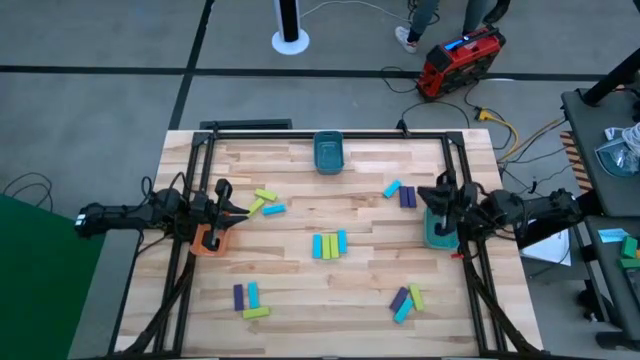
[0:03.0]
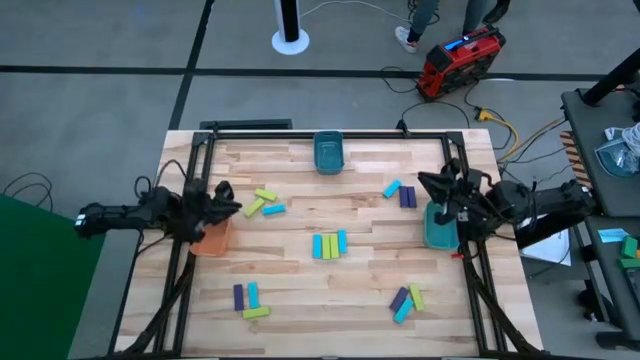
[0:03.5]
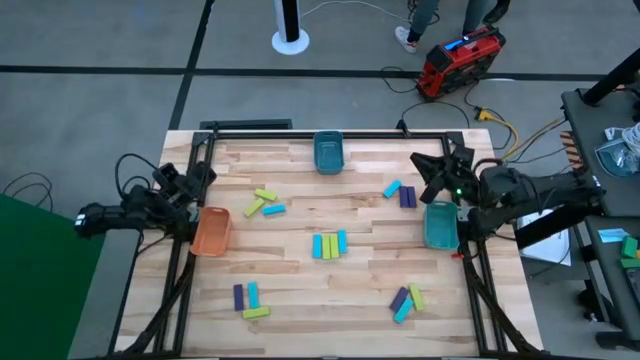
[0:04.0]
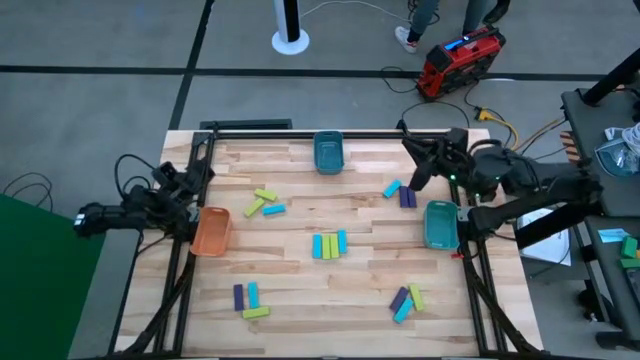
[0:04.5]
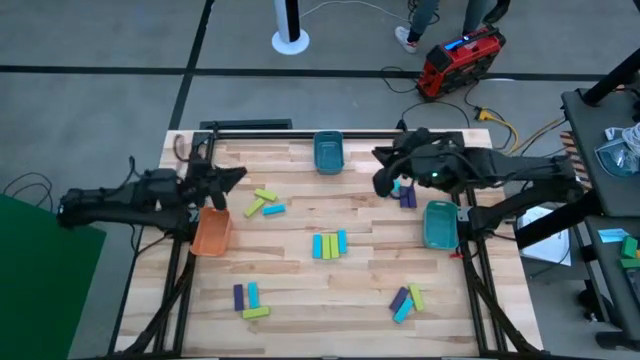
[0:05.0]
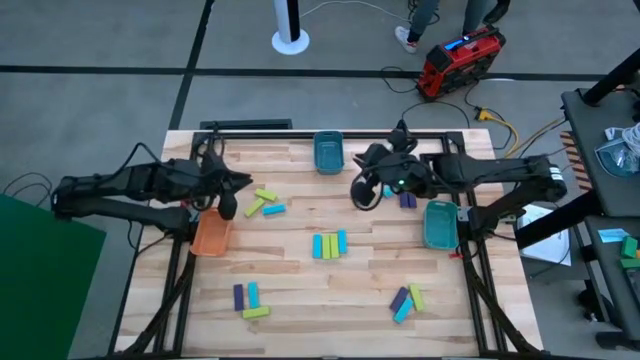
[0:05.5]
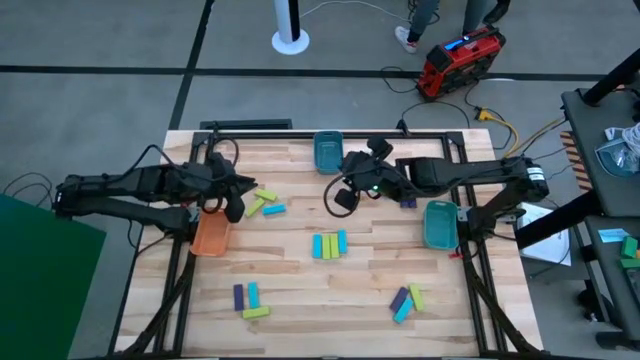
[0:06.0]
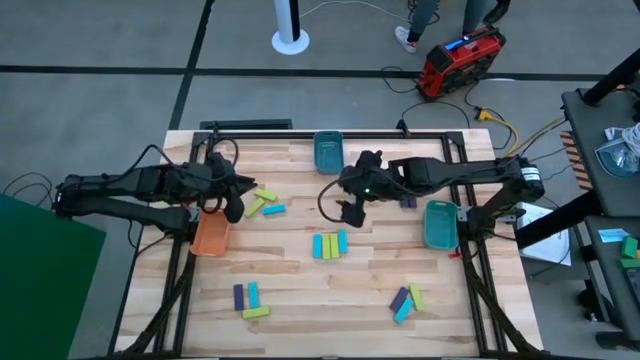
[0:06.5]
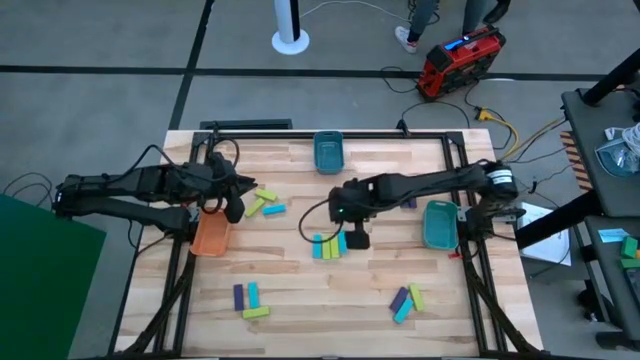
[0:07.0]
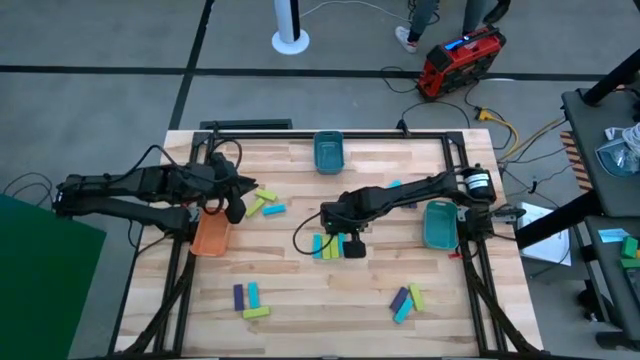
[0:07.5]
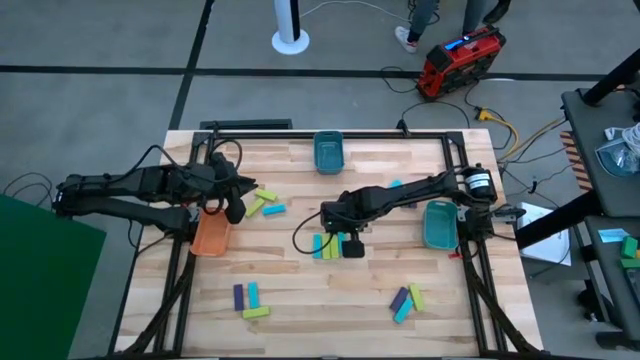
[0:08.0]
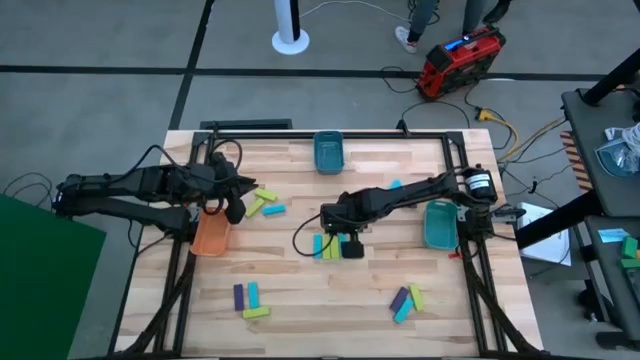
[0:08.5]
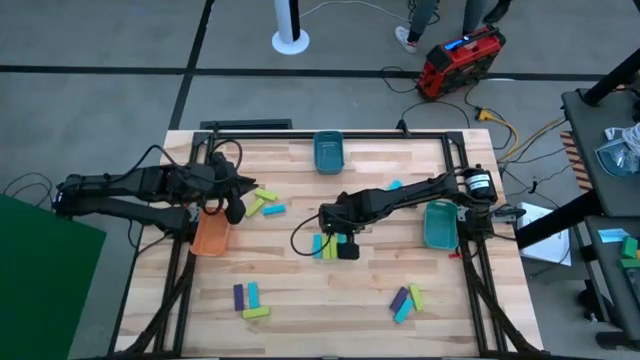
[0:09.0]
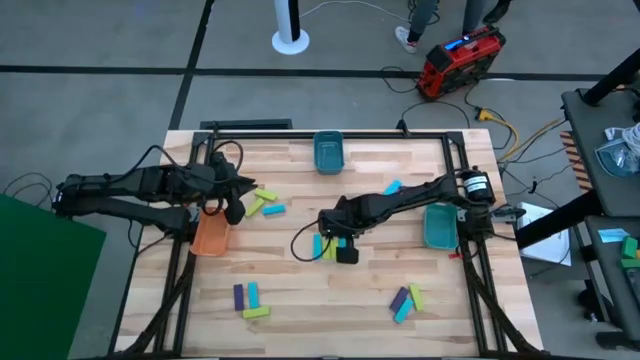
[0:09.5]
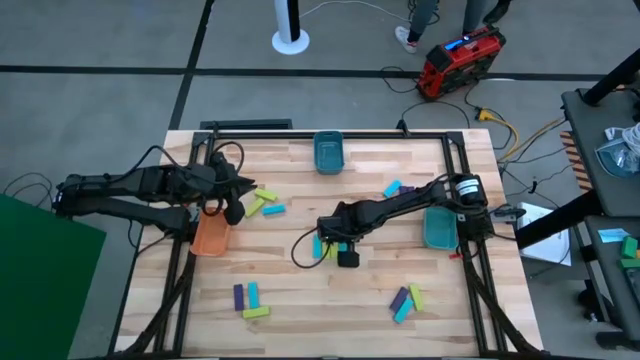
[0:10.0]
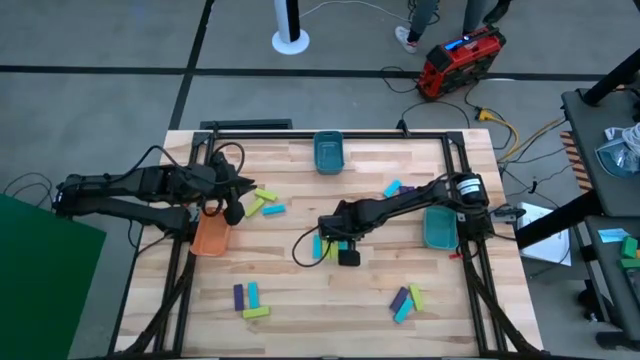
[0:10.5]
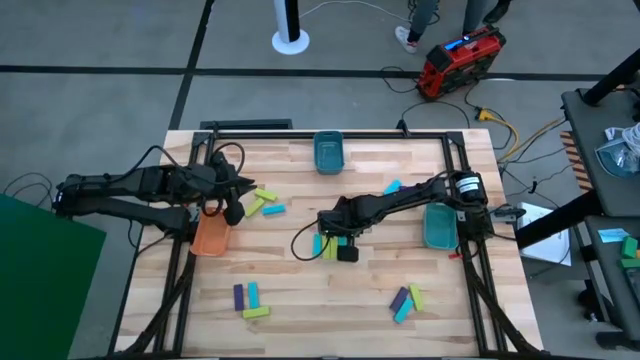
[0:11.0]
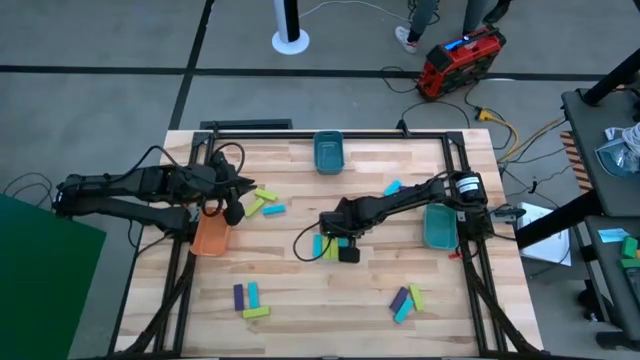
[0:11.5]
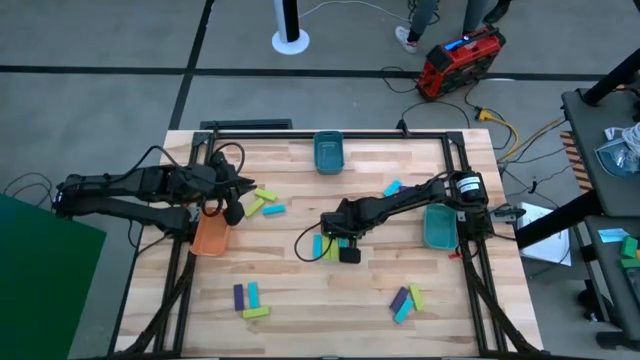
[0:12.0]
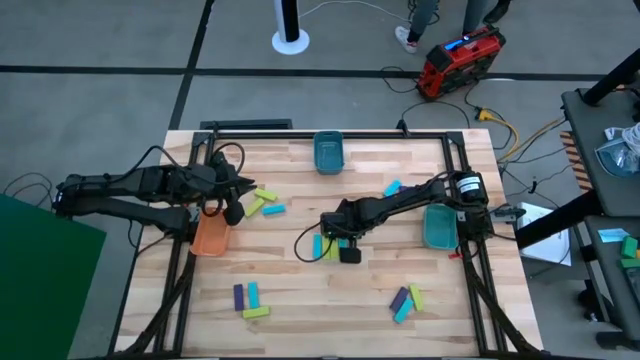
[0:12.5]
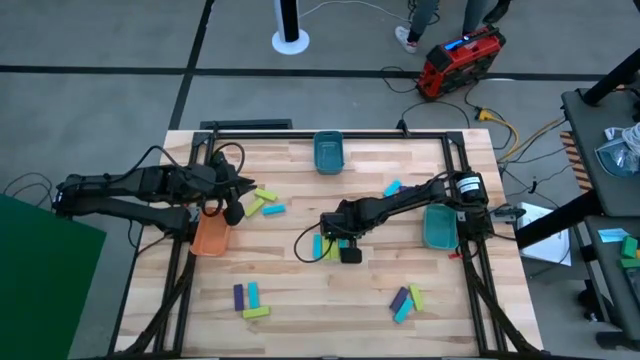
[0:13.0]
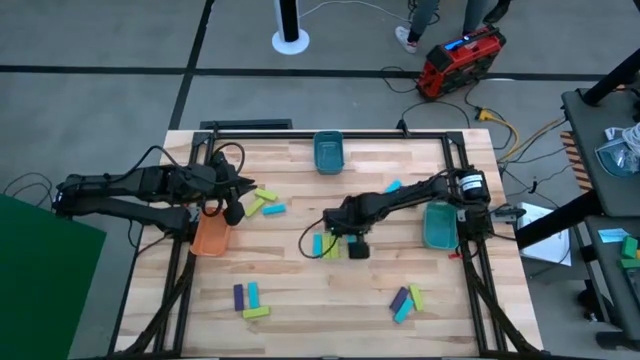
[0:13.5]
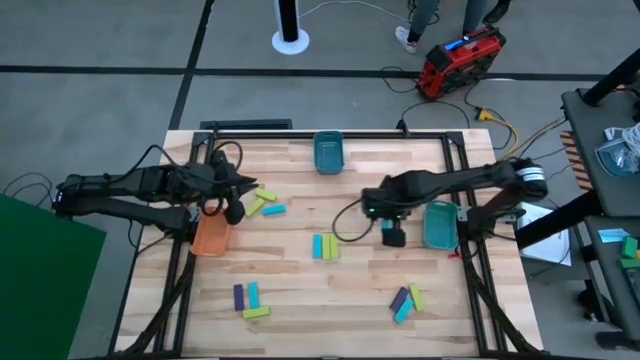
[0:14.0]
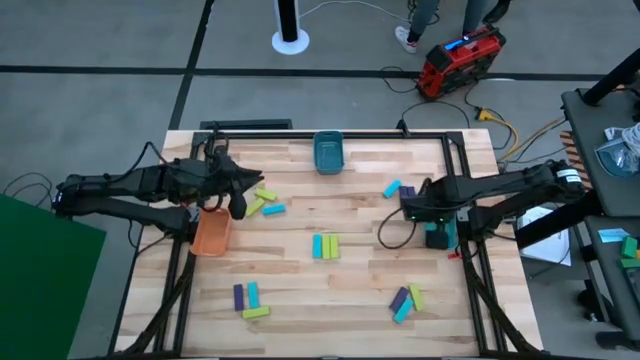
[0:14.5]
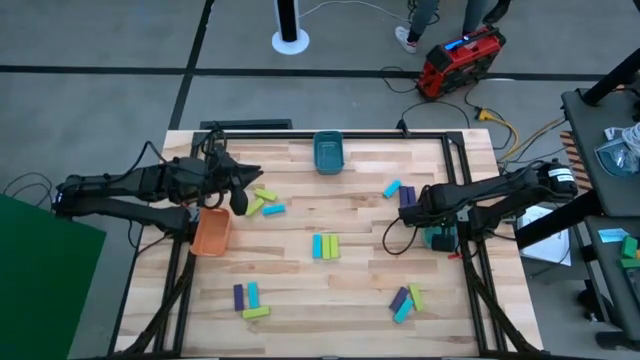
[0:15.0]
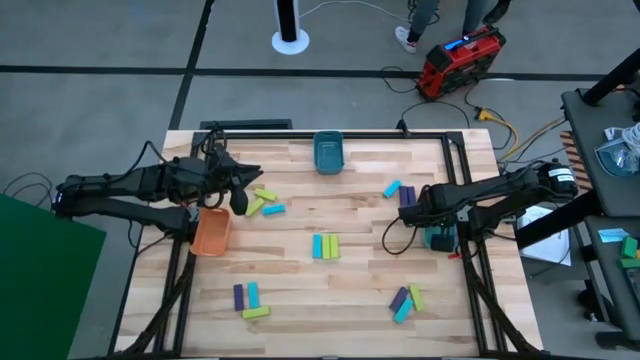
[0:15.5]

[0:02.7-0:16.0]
Task: Sort blocks
Put the blue block into the light blue bin

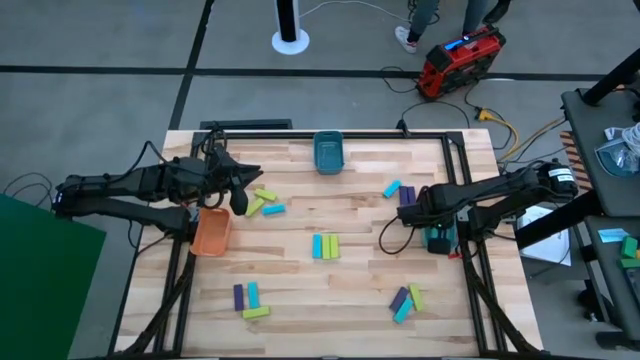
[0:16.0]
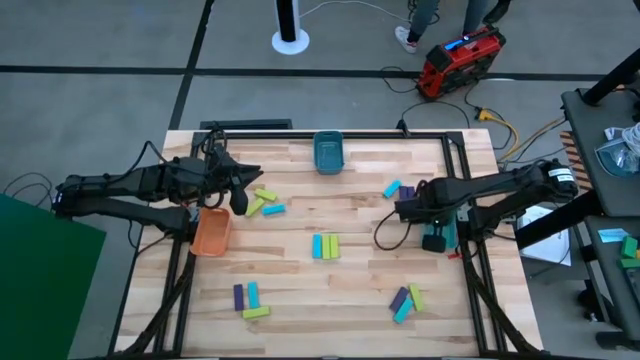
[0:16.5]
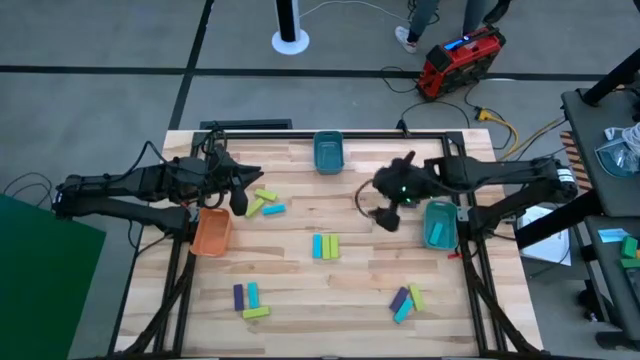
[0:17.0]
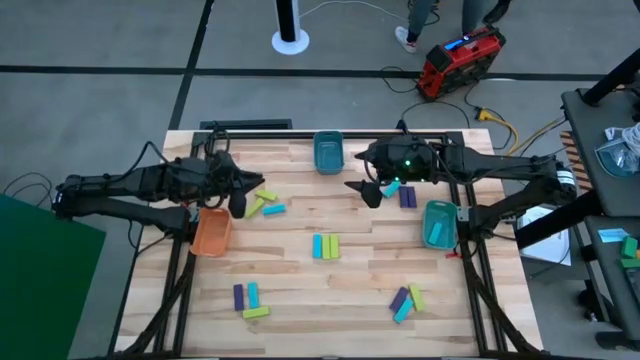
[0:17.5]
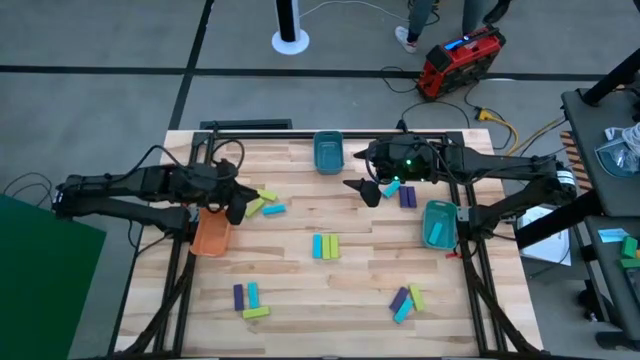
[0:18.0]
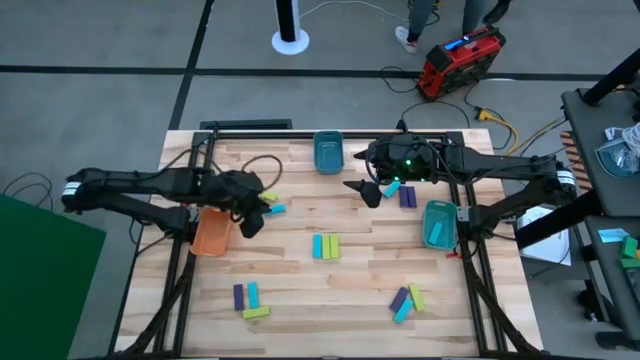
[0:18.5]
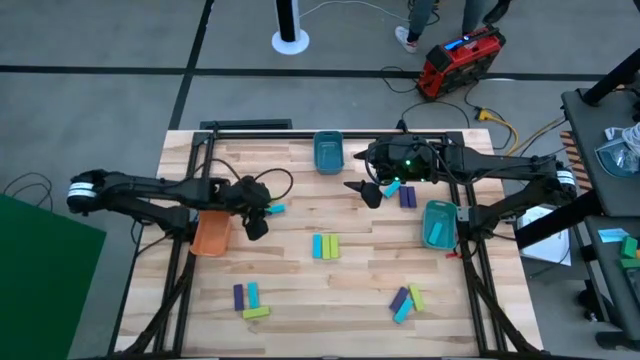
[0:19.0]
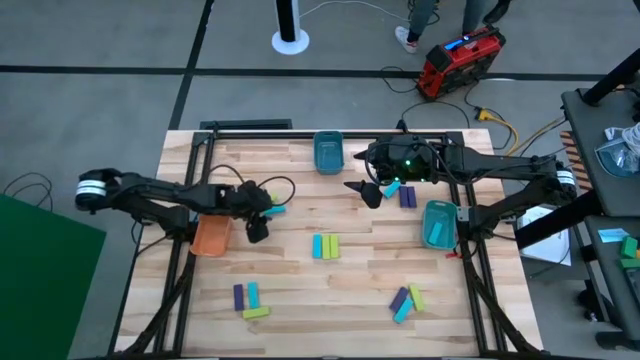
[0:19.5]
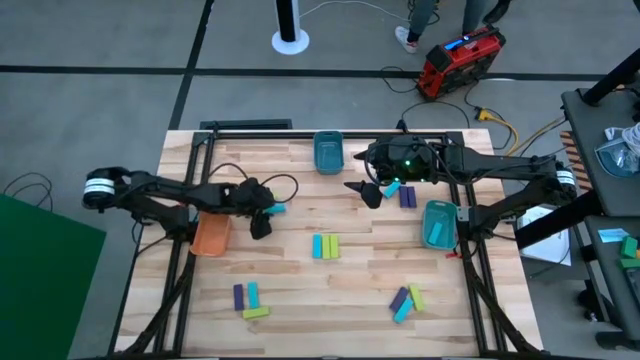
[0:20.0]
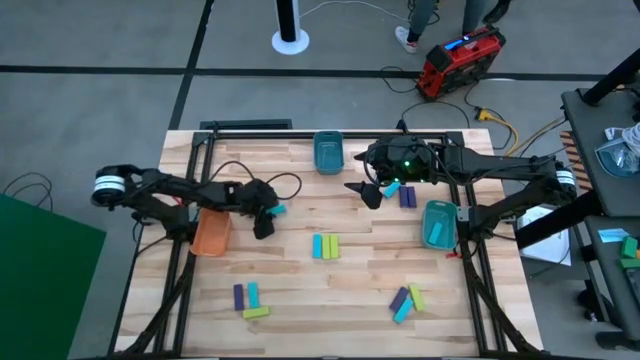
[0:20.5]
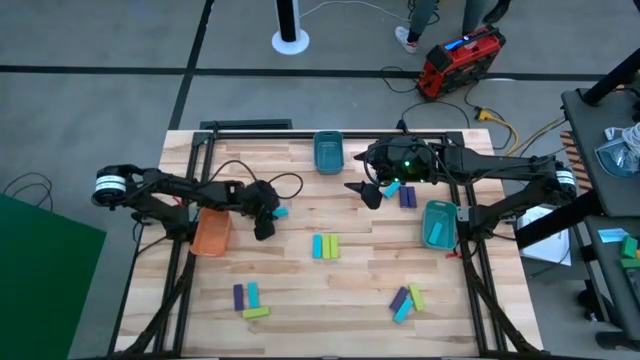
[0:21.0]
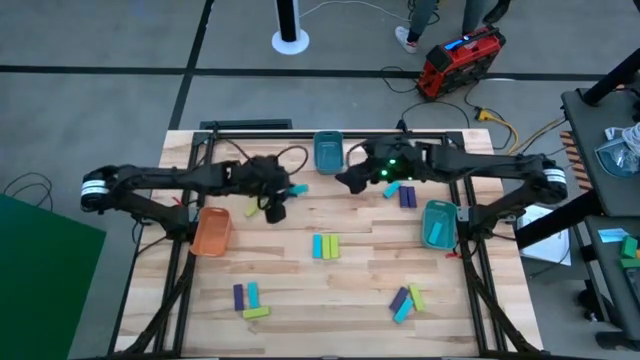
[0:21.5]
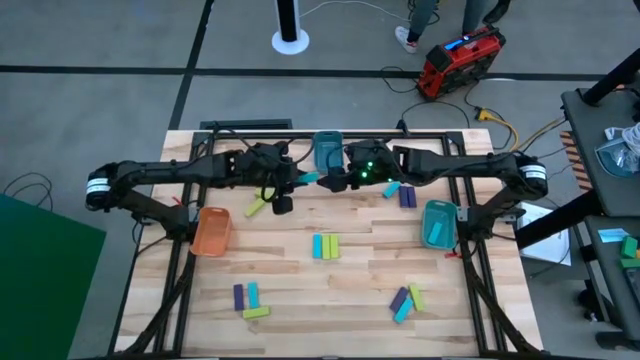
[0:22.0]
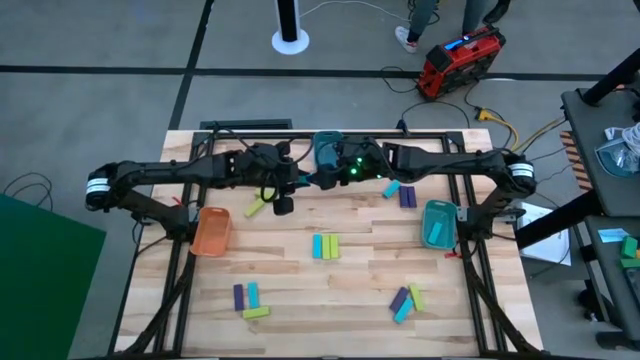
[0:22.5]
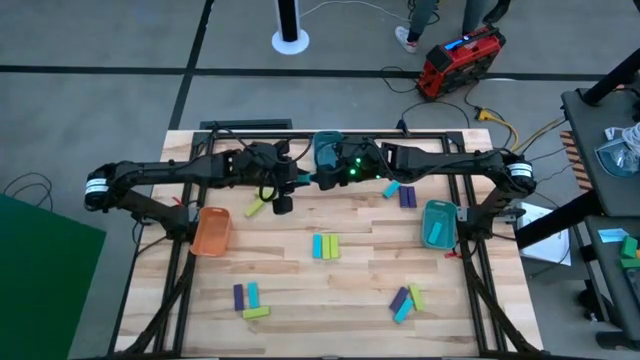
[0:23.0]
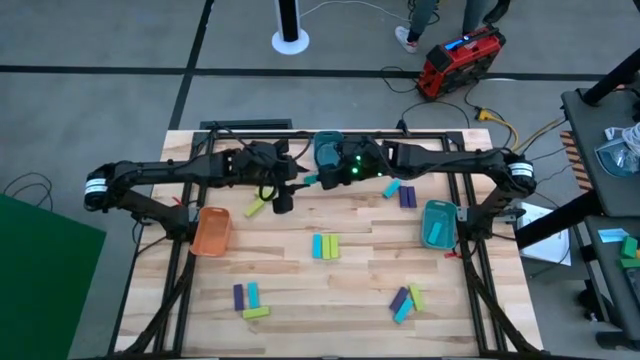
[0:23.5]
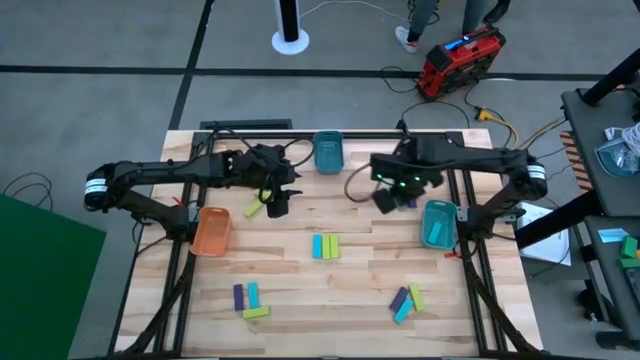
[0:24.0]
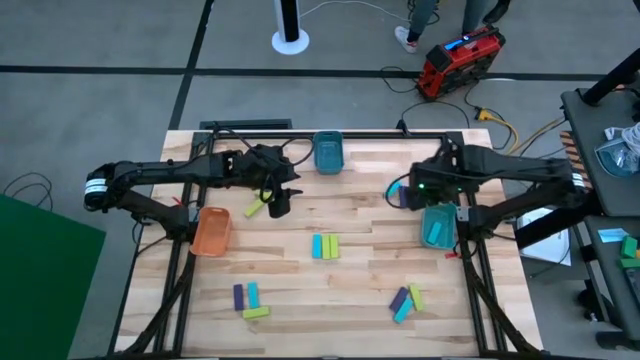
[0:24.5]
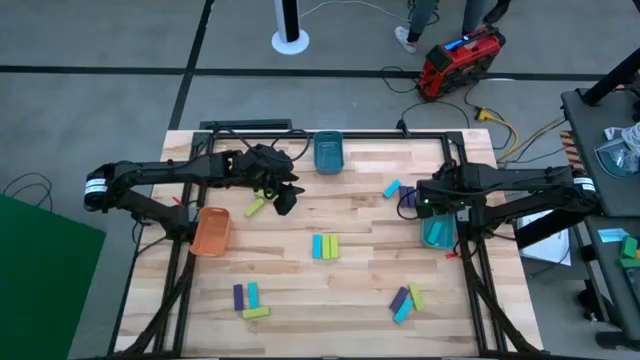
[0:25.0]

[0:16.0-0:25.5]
Put the blue block into the light blue bin
